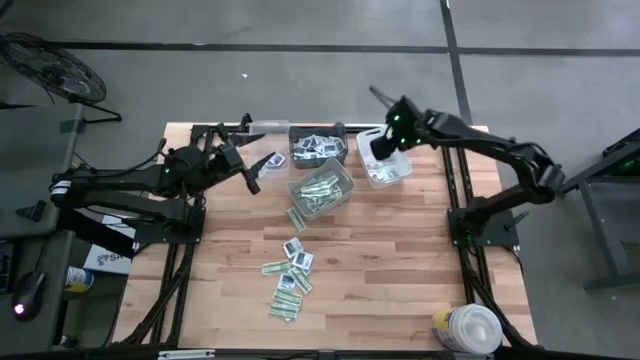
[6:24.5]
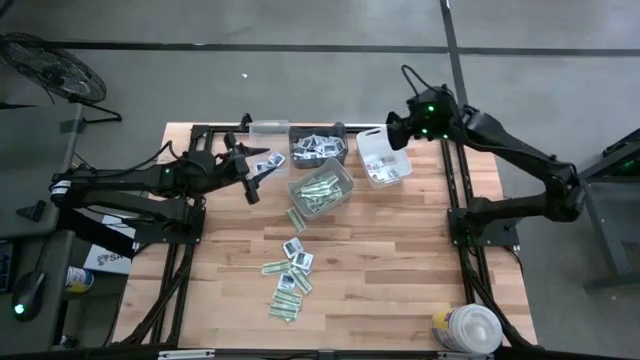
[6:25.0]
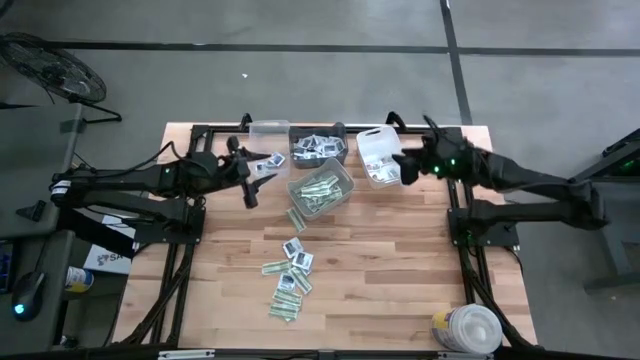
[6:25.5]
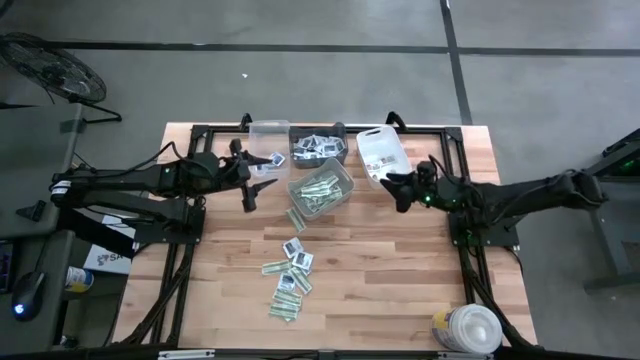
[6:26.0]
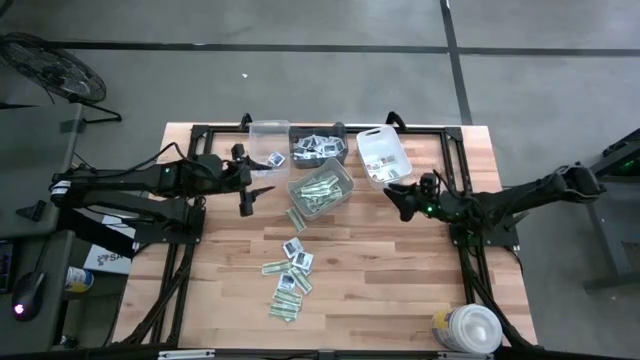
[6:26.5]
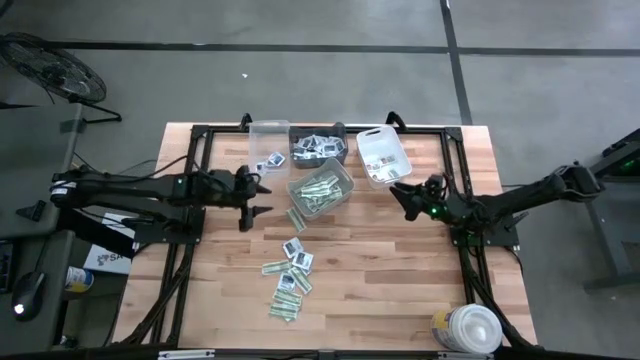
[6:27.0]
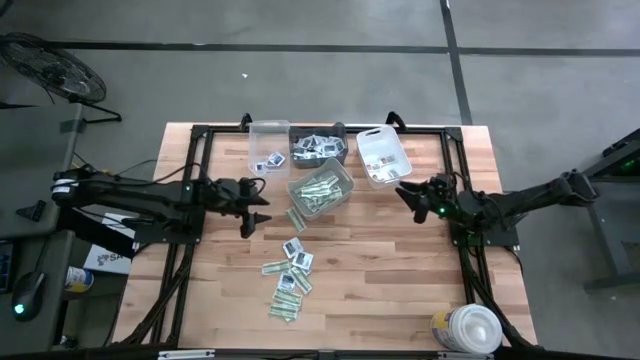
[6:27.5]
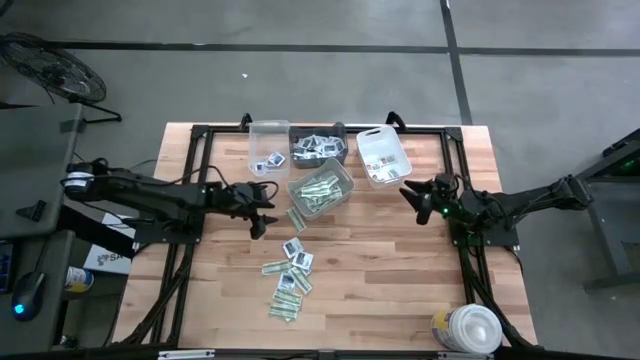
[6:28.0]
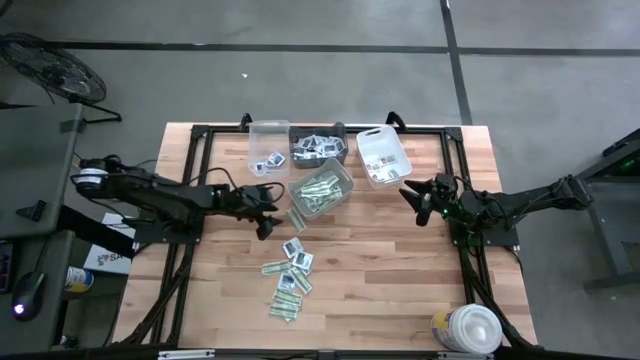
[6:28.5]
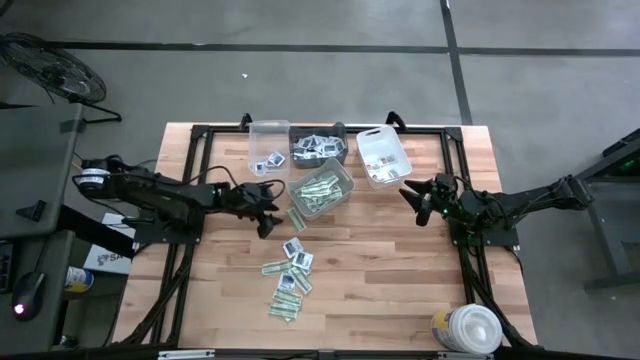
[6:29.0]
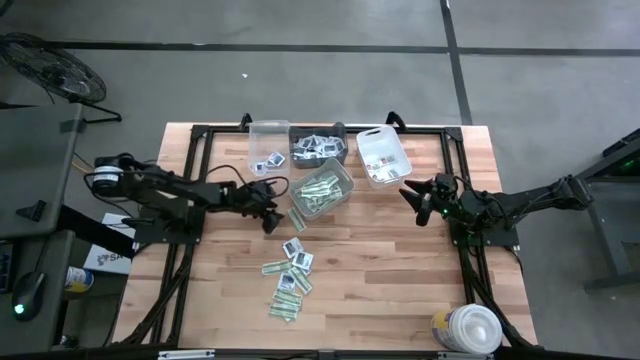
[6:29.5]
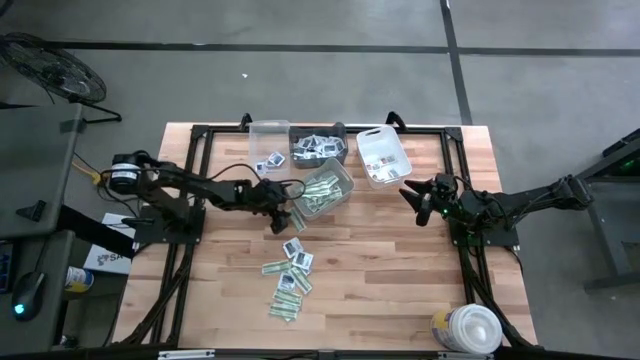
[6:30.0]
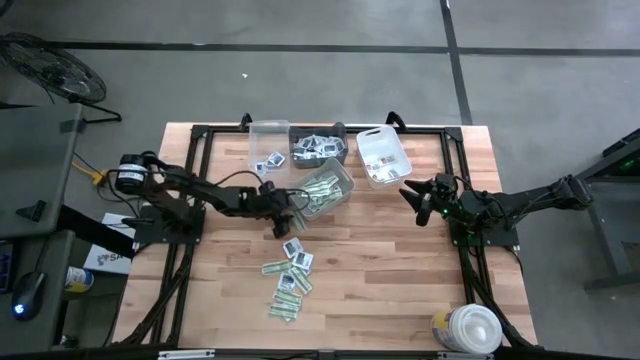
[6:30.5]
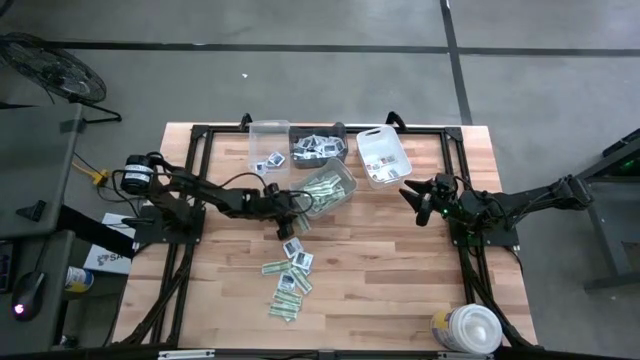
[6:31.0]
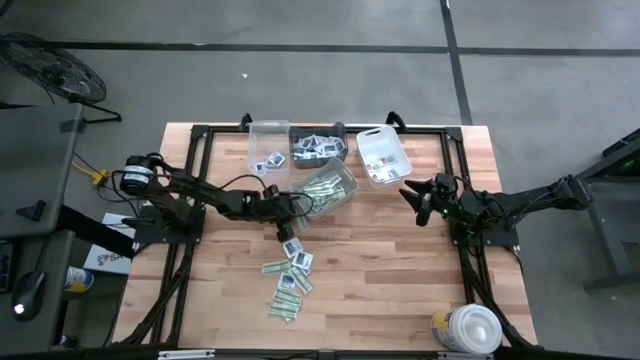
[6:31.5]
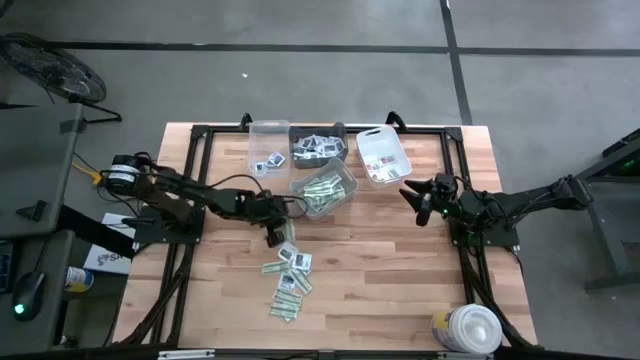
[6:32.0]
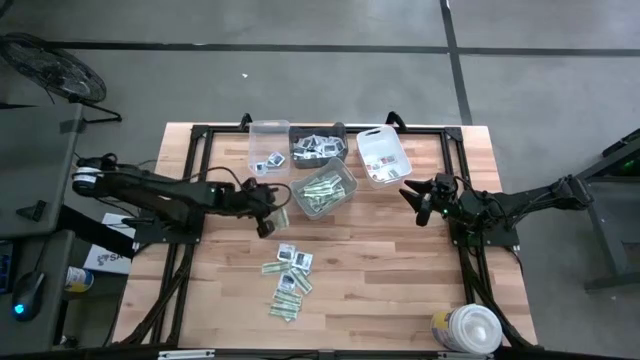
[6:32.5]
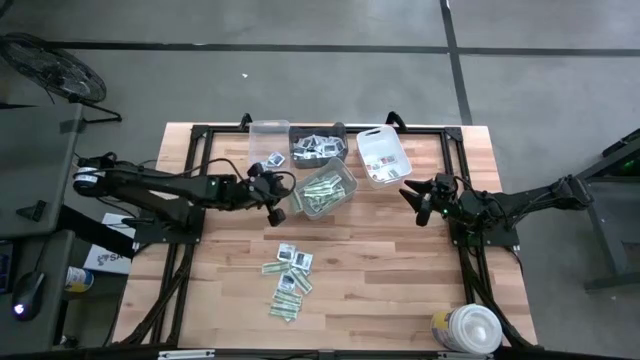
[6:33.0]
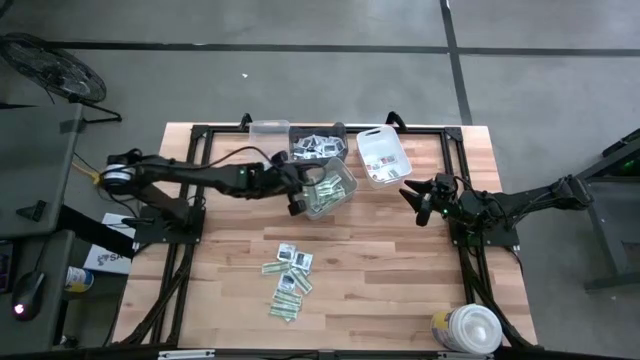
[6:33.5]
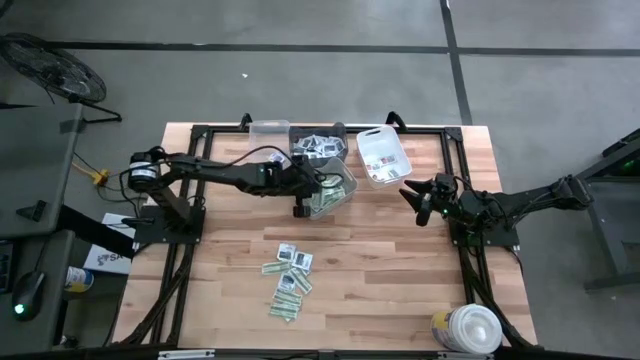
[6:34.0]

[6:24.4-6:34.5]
Task: Pick & Place First Aid Supplies
Put the bandage pack into the gray bin

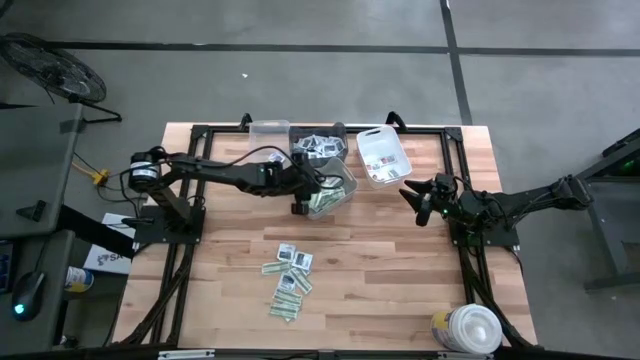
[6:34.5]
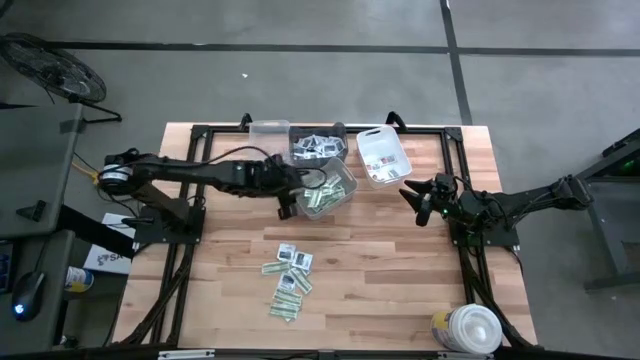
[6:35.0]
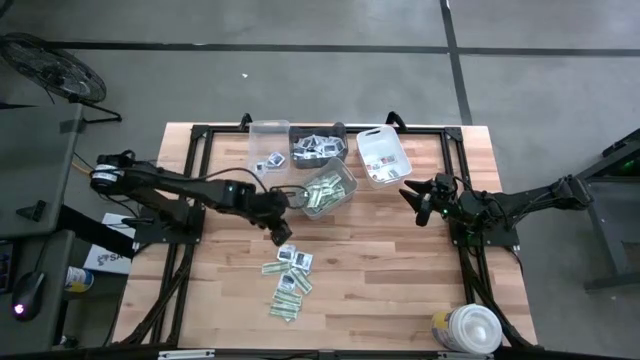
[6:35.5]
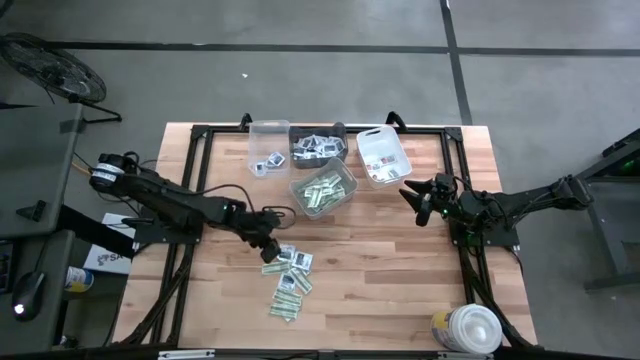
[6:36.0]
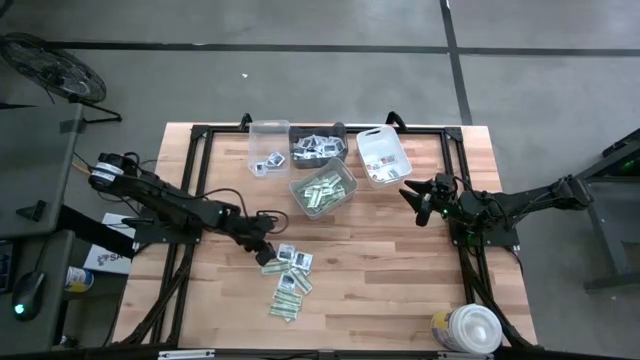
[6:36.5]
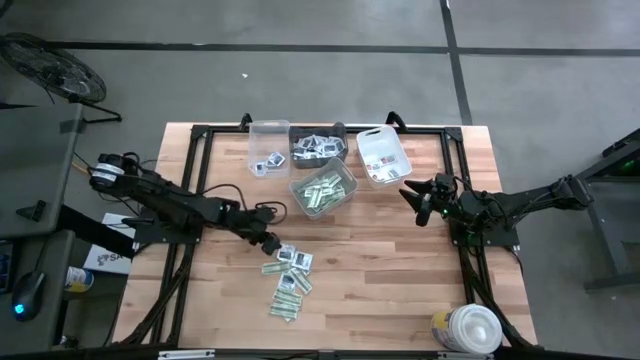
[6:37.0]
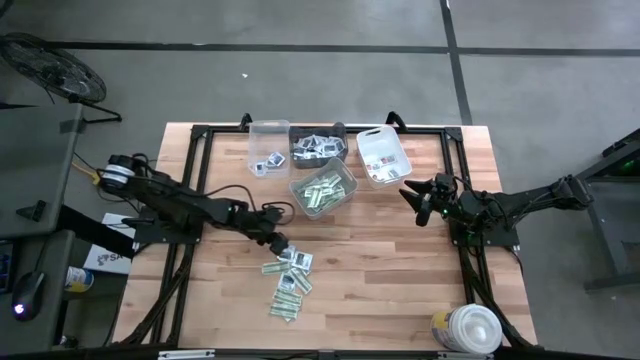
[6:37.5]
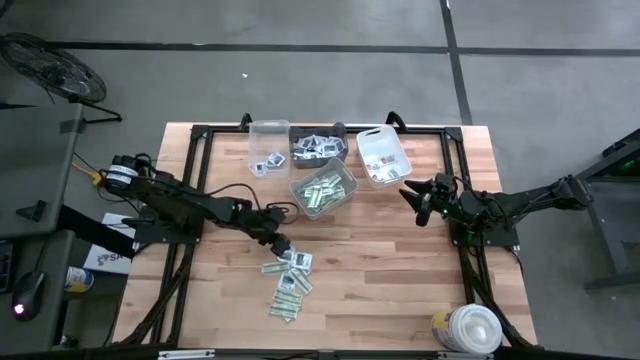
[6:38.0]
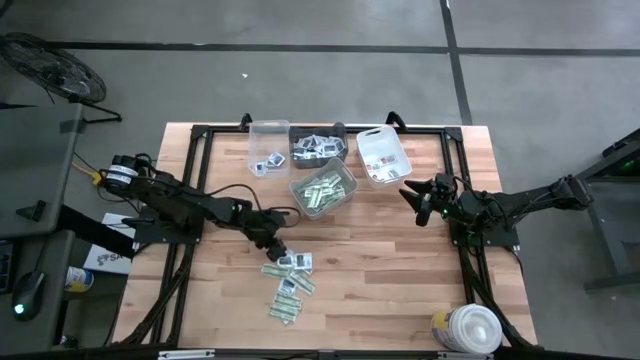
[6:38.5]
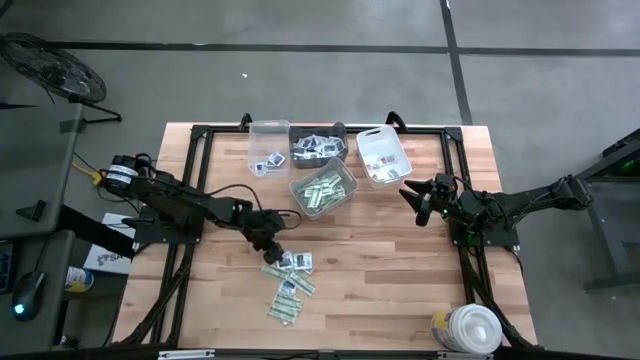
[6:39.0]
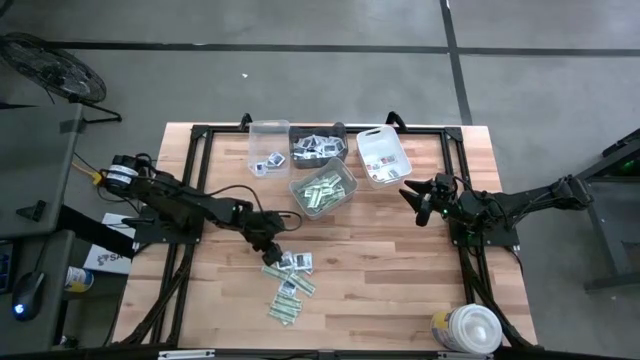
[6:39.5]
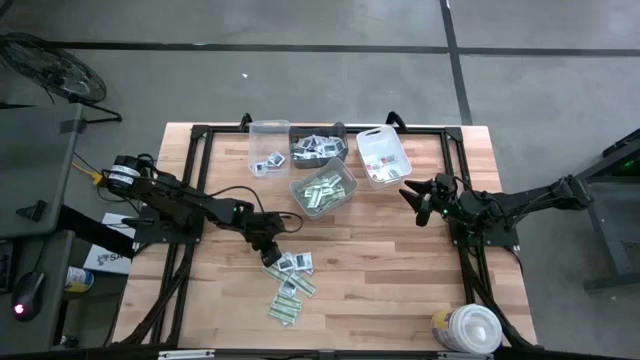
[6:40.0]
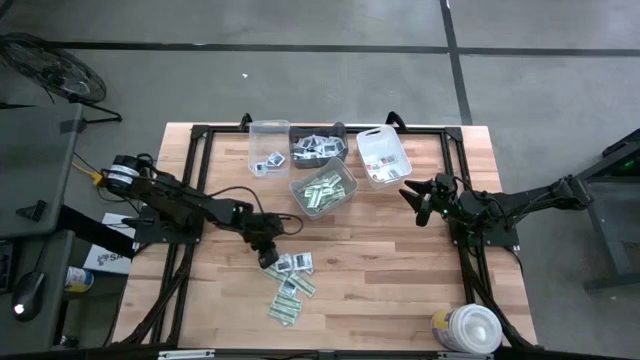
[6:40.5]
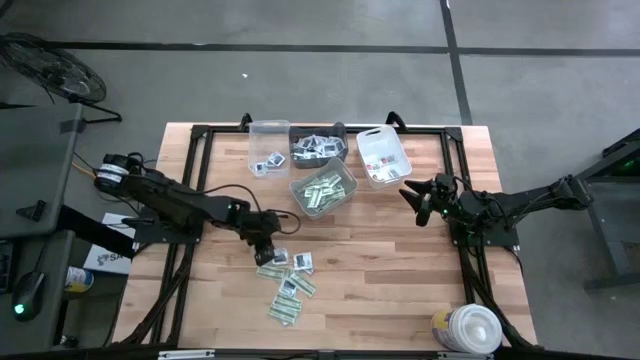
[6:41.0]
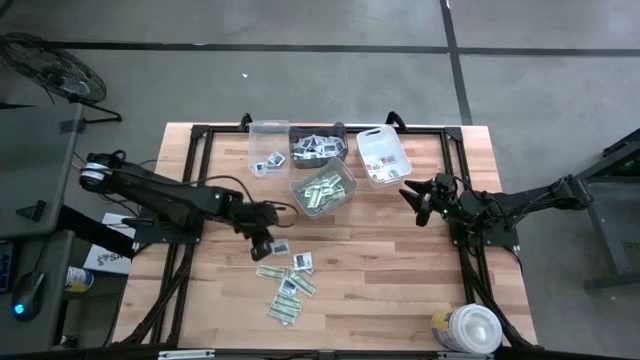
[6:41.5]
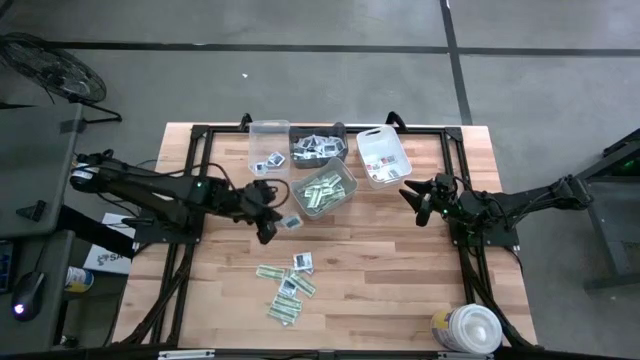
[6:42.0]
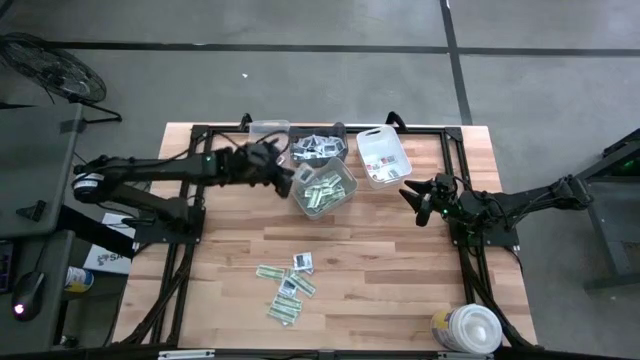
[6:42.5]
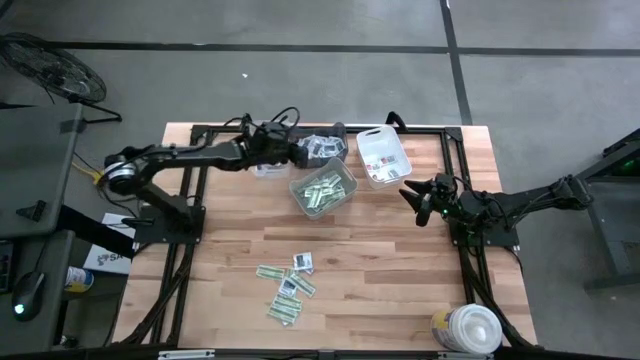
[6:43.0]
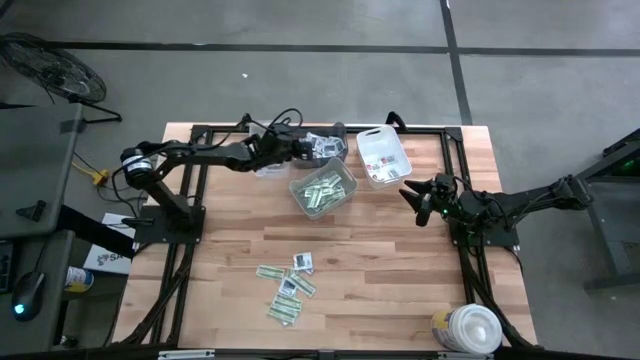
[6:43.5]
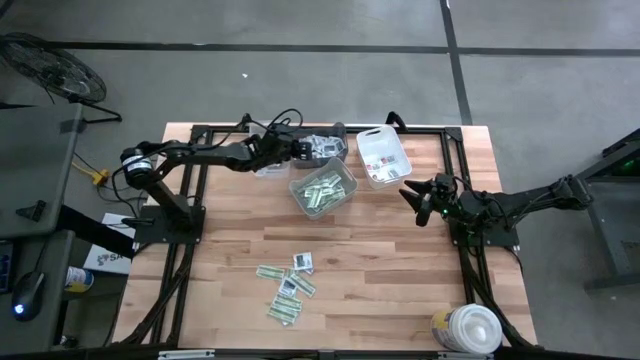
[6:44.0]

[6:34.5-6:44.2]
Put the towelette pack into the black bin

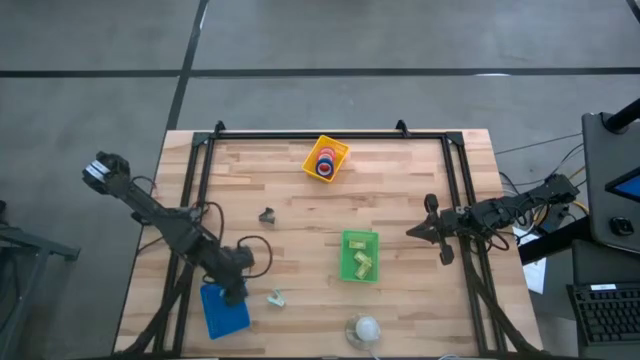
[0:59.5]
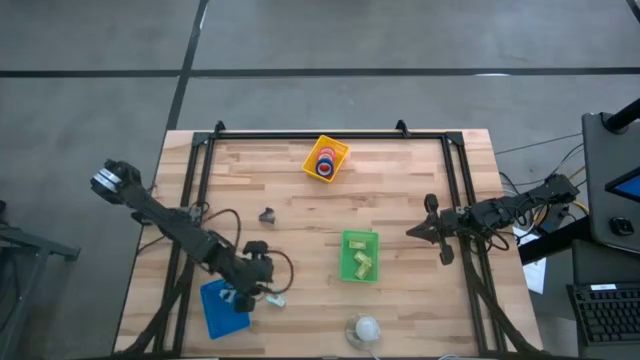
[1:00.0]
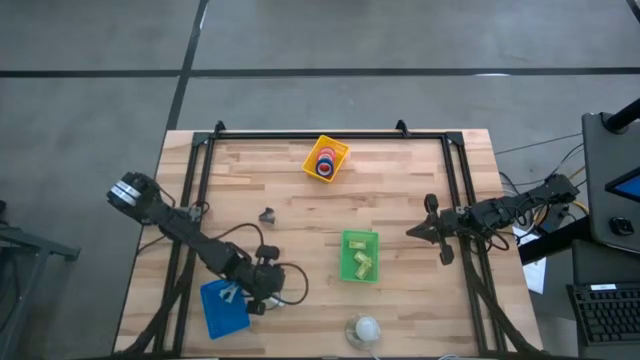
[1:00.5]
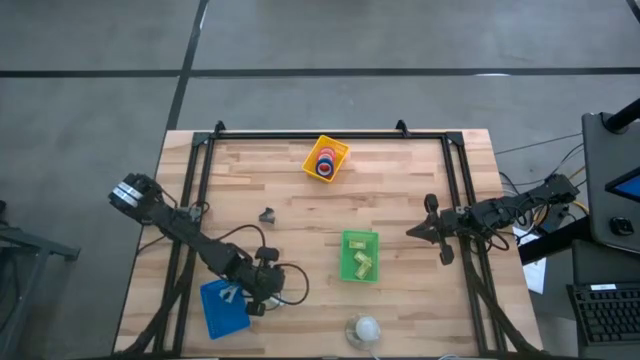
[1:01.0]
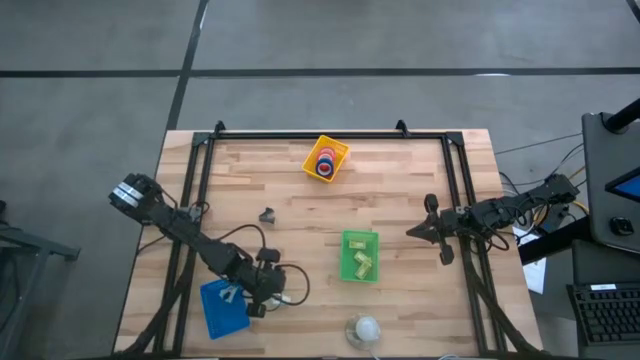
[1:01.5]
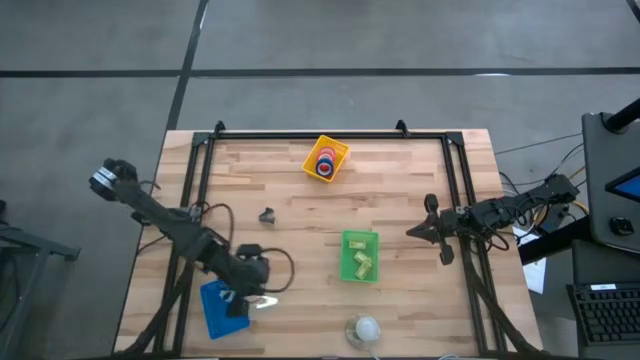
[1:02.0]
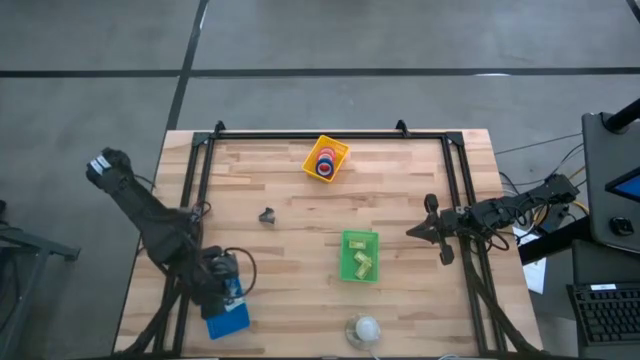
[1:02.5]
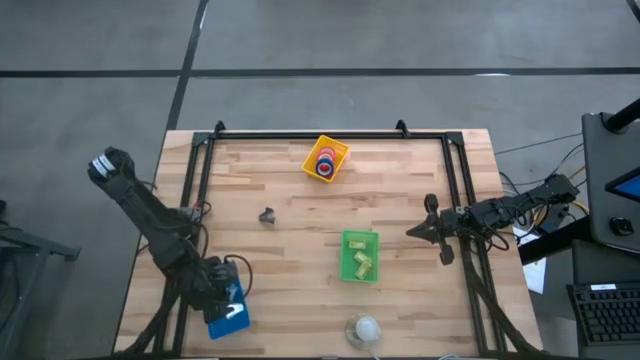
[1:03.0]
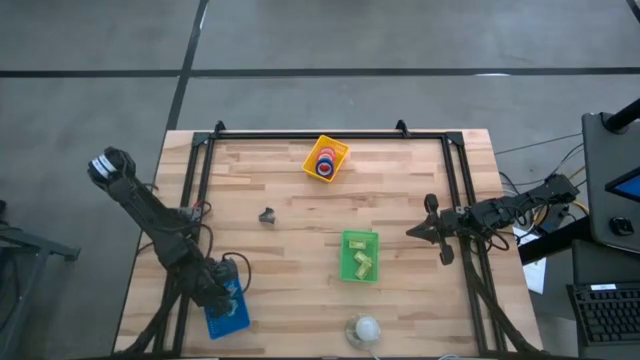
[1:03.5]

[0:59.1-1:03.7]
Task: Pick and place Stapler, Stapler remover, tape
Put the light blue stapler into the blue bin
